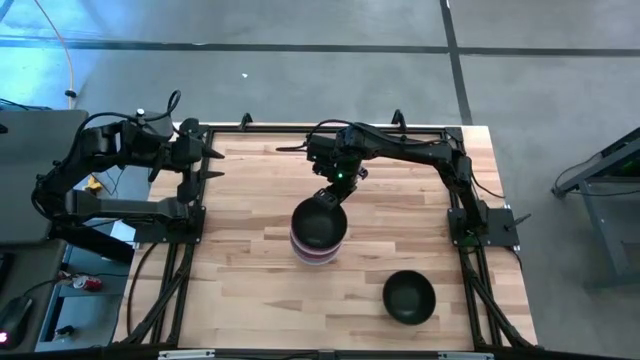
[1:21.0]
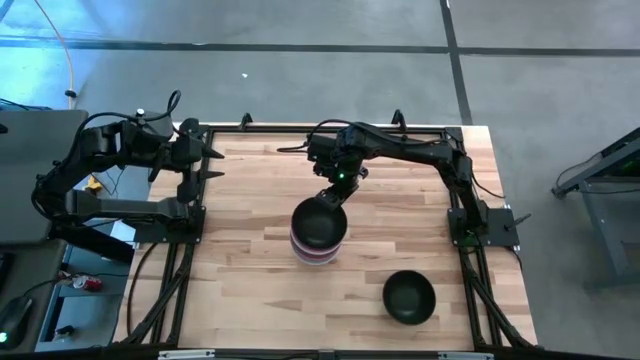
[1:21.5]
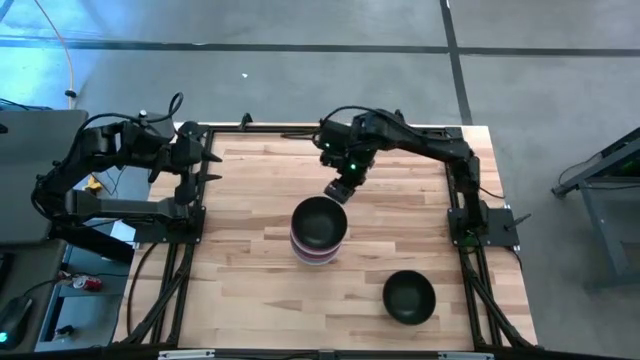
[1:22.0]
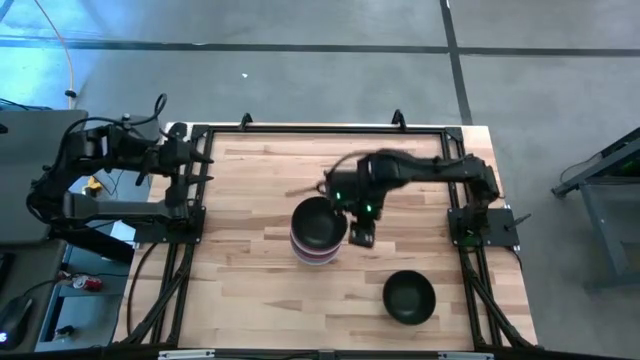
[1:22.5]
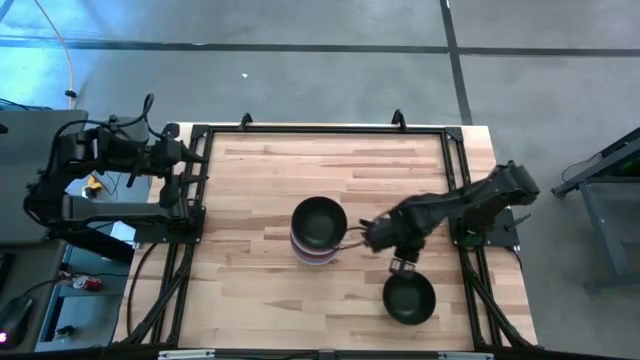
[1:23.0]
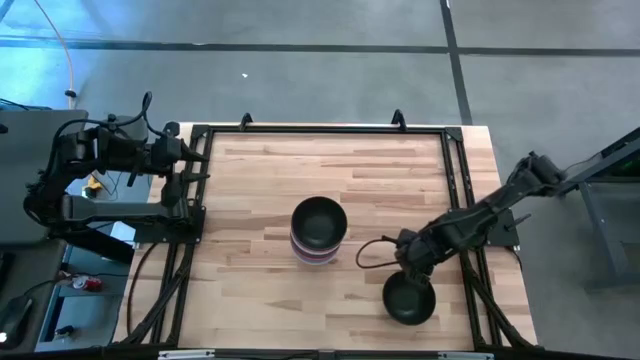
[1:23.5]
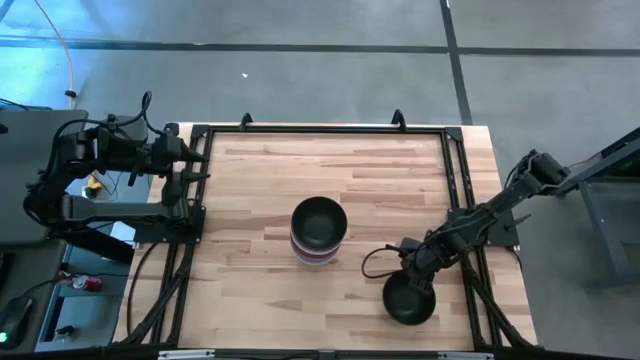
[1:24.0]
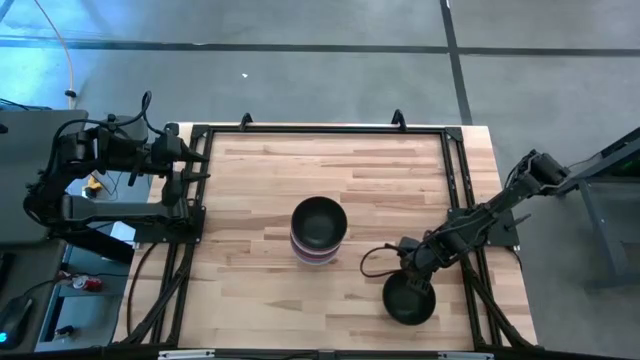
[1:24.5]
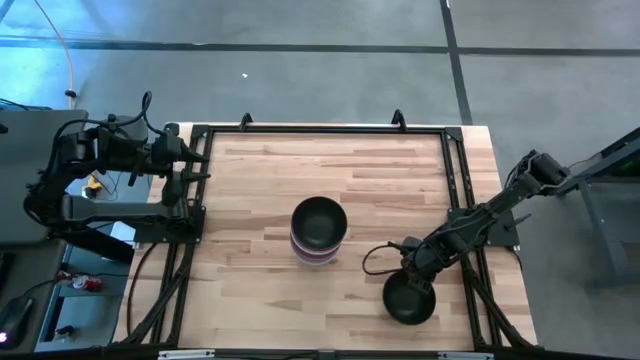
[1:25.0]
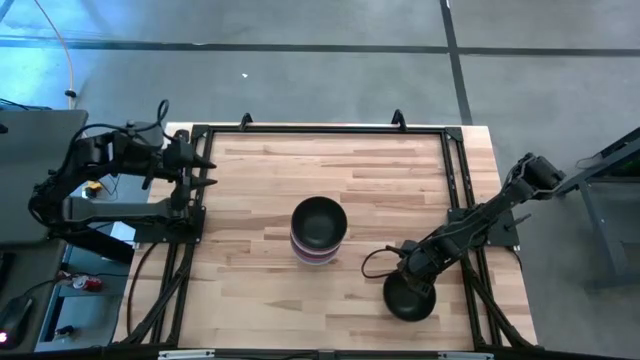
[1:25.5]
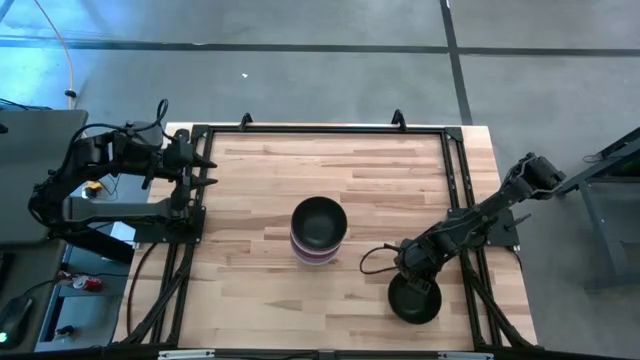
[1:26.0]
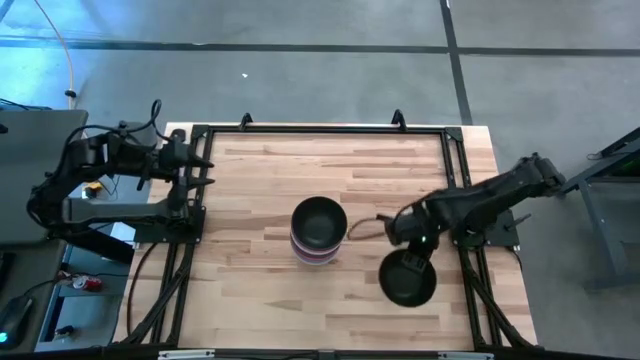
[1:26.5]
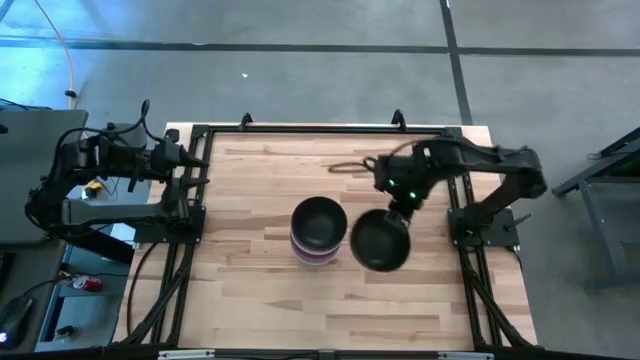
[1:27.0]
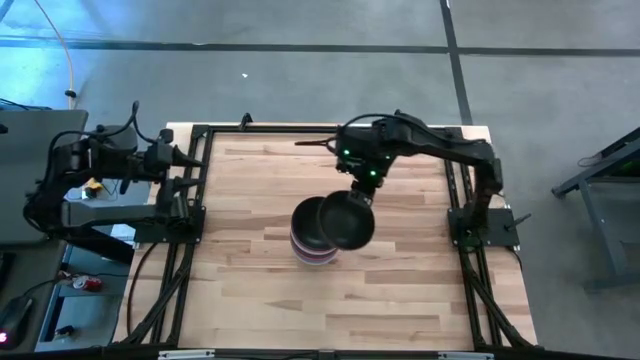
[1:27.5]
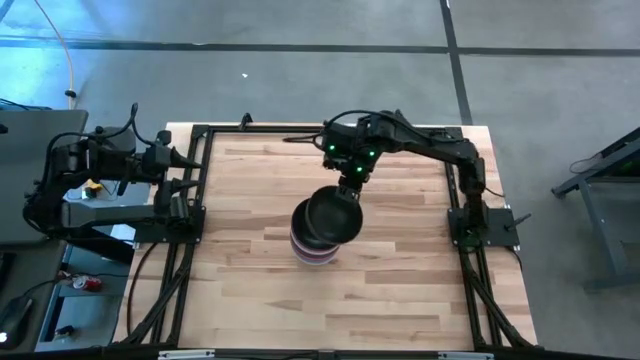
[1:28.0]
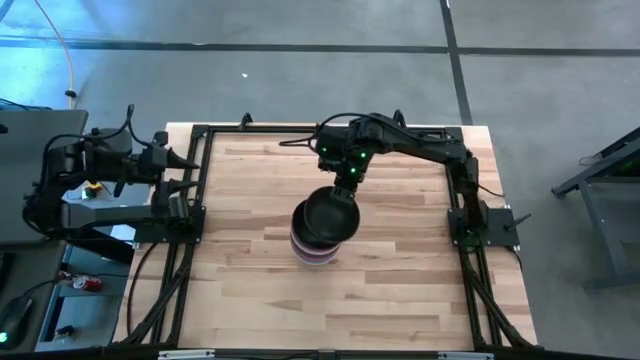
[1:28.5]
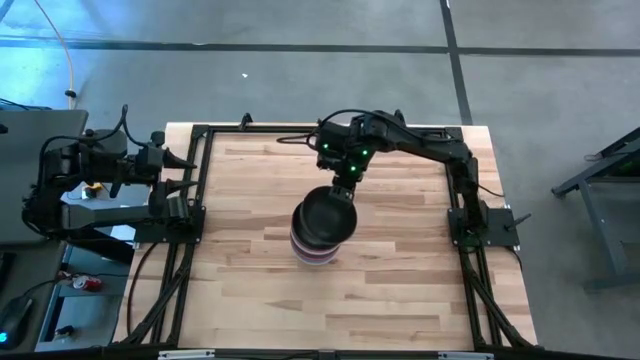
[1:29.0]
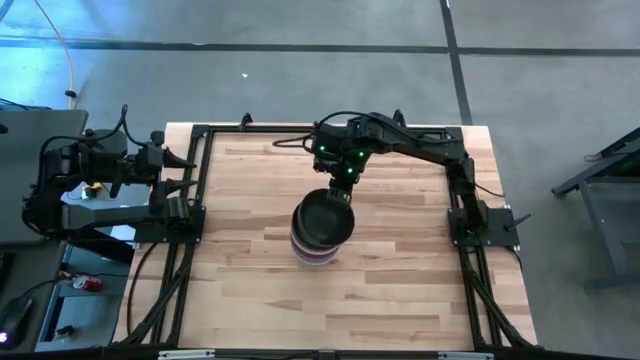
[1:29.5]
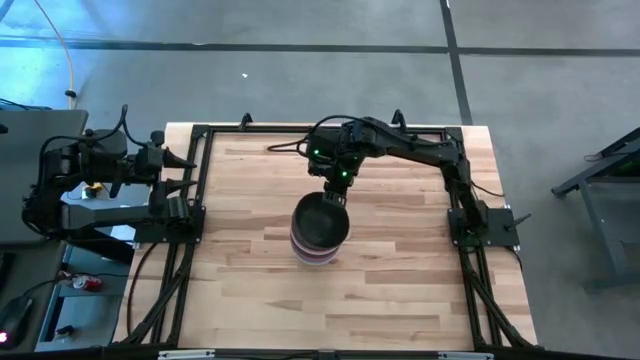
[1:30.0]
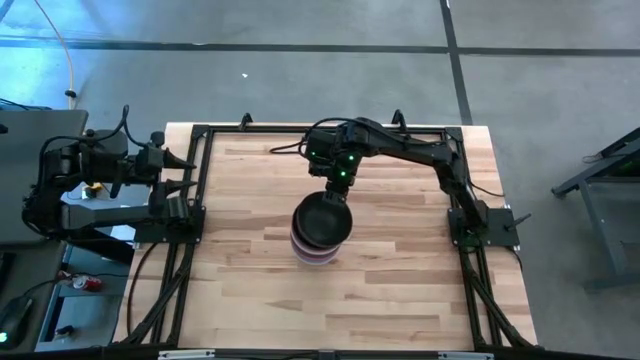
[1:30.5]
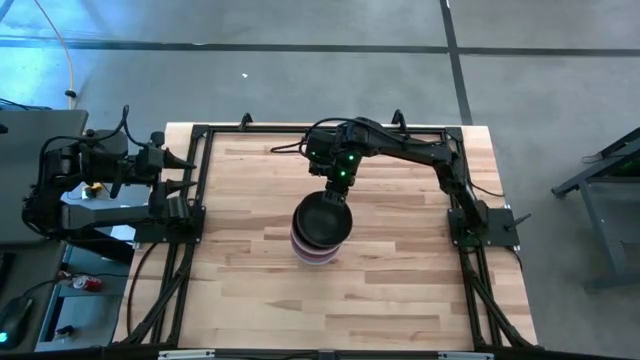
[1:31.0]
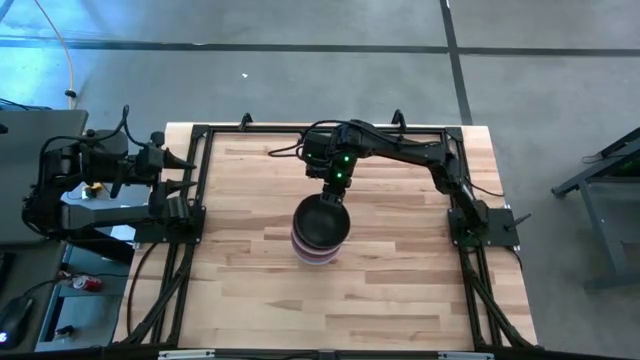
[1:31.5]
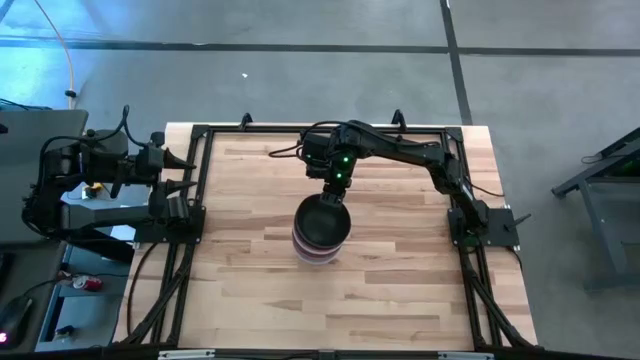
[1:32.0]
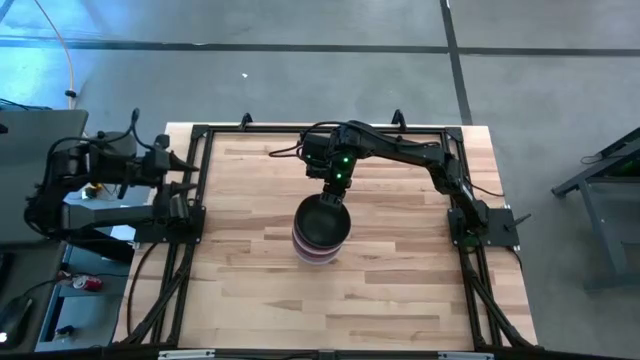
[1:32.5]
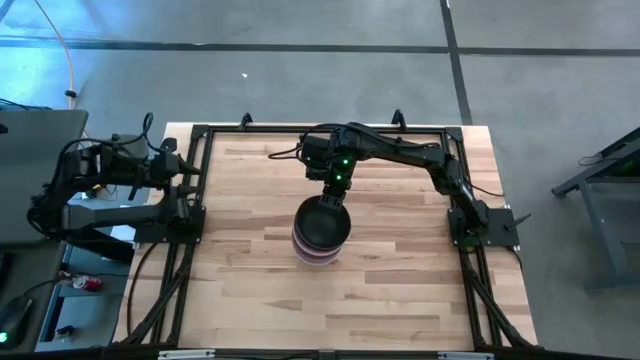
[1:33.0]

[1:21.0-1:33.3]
Task: Nest bowls inside each other
Stack the black bowl on top of the top black bowl

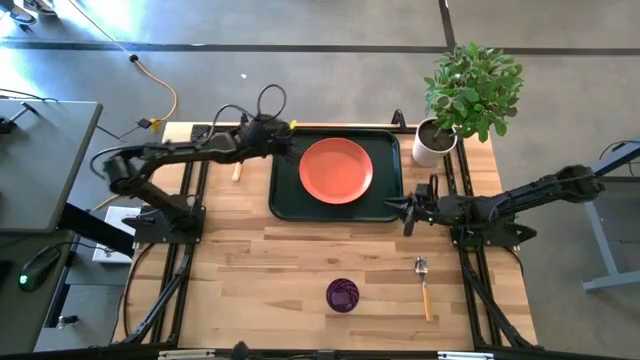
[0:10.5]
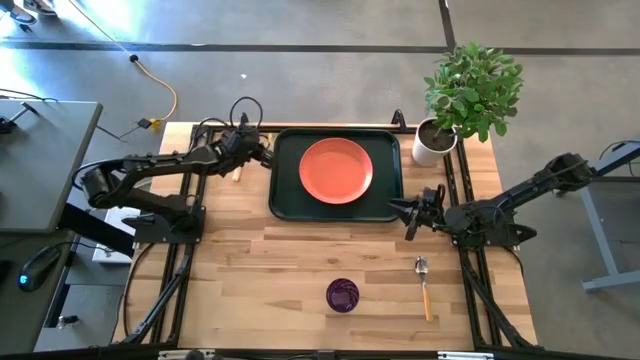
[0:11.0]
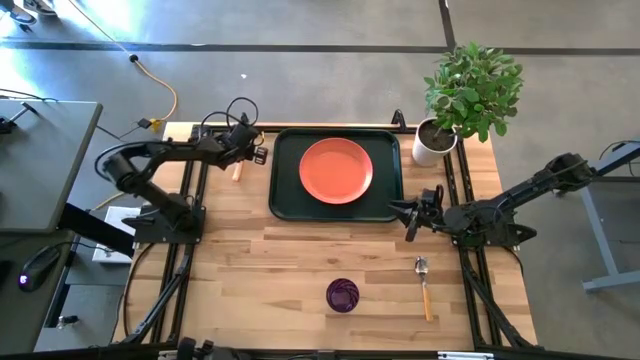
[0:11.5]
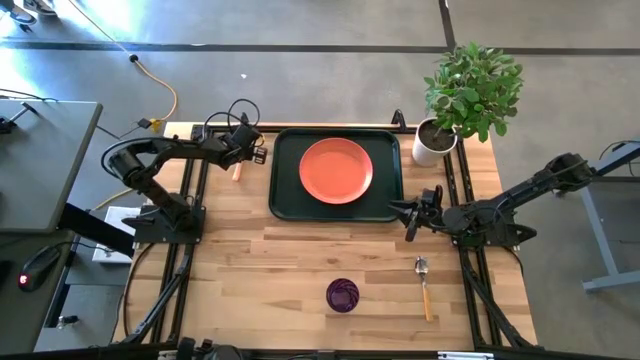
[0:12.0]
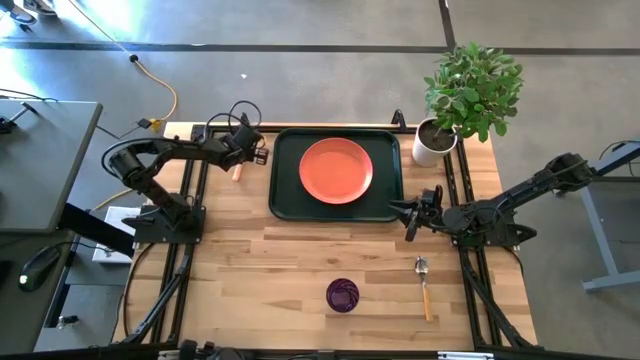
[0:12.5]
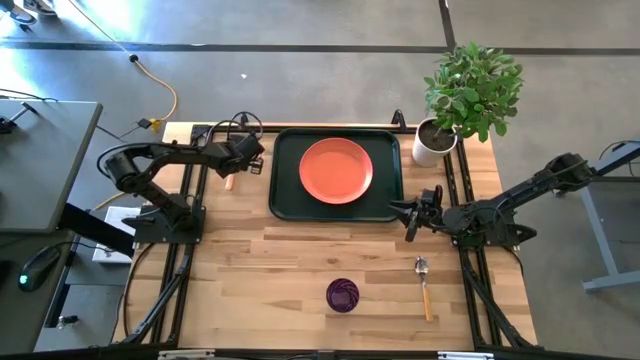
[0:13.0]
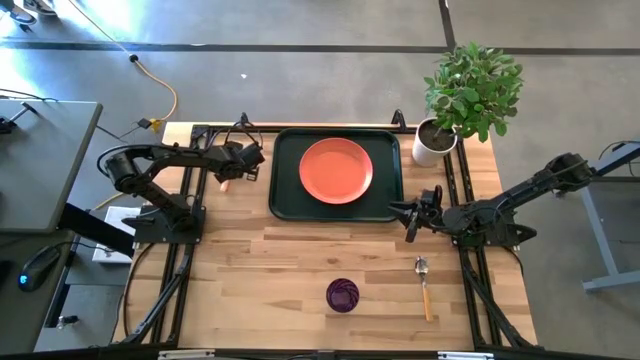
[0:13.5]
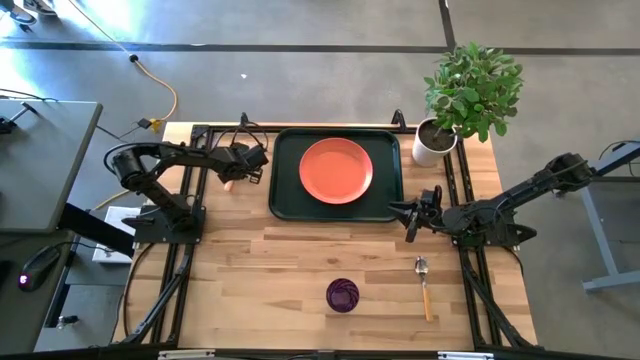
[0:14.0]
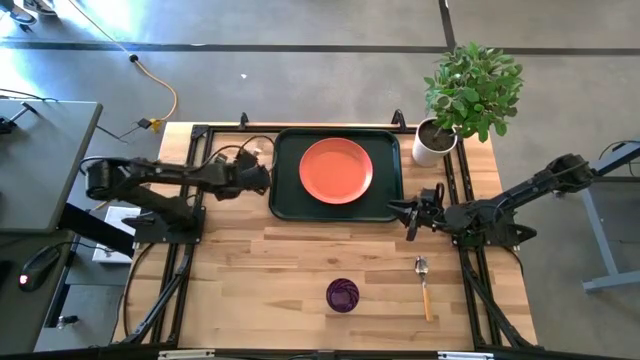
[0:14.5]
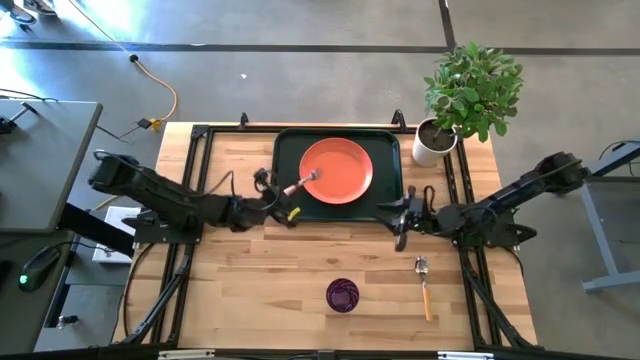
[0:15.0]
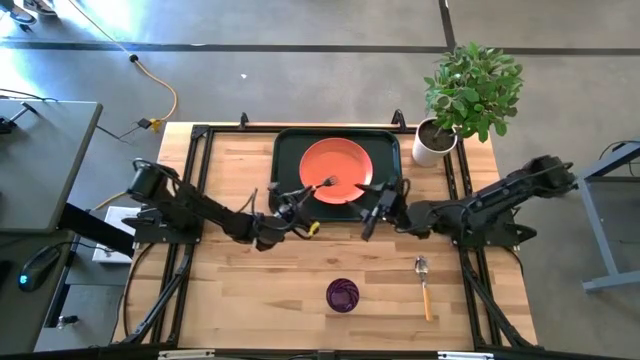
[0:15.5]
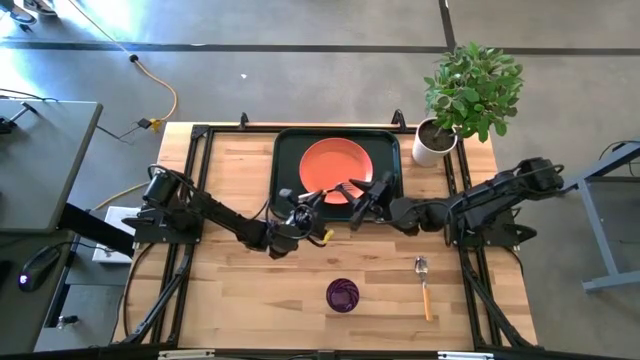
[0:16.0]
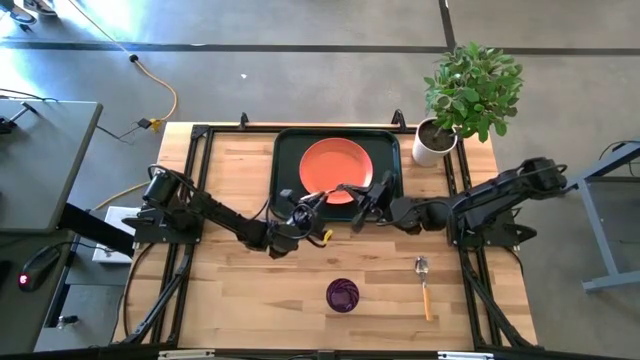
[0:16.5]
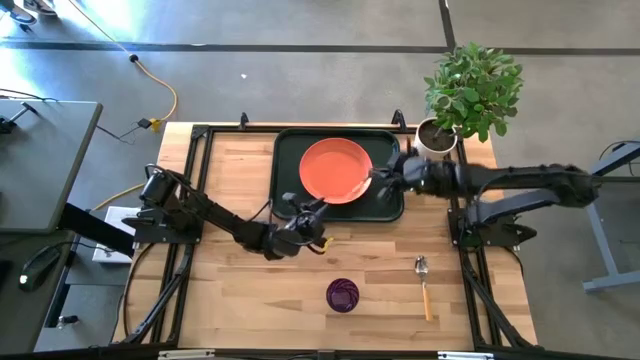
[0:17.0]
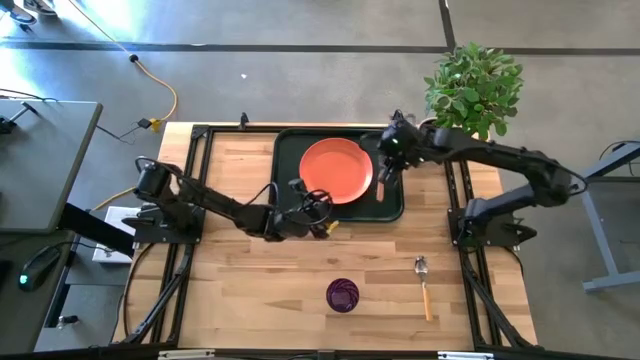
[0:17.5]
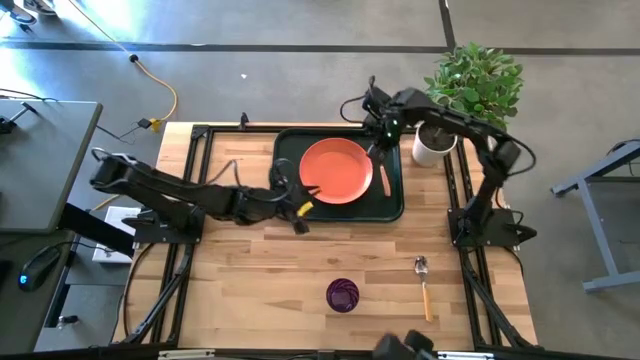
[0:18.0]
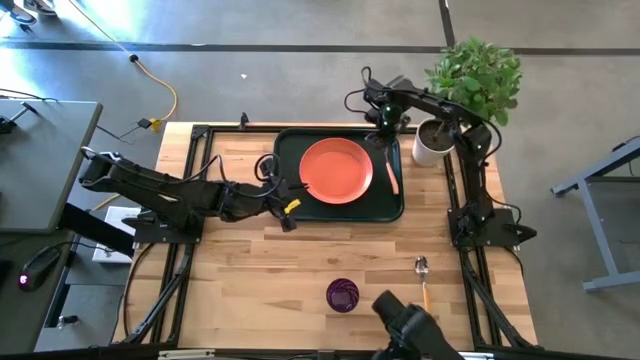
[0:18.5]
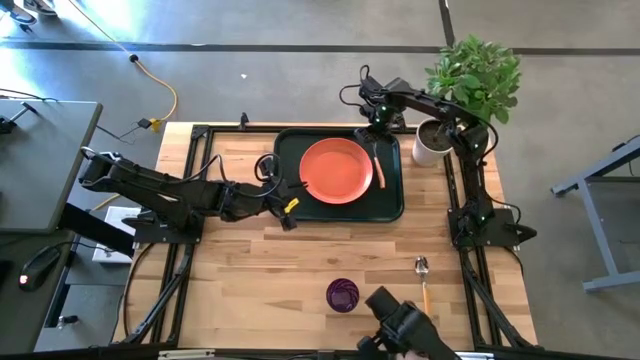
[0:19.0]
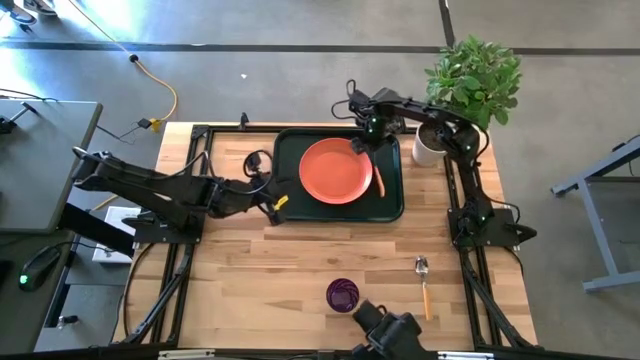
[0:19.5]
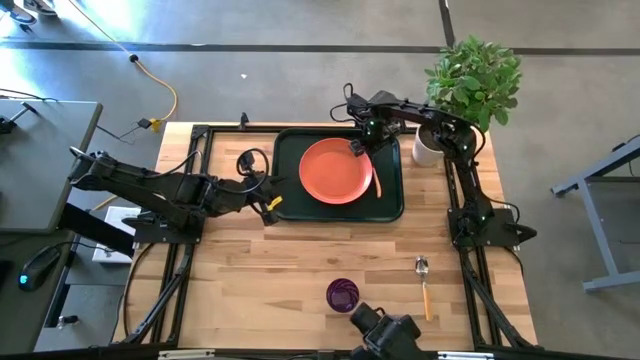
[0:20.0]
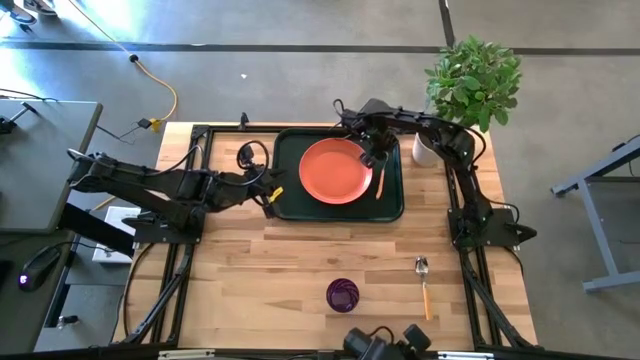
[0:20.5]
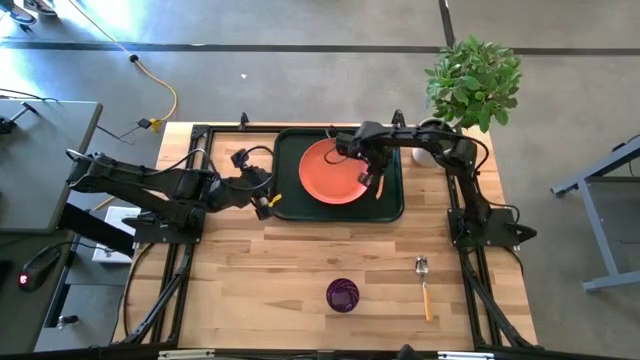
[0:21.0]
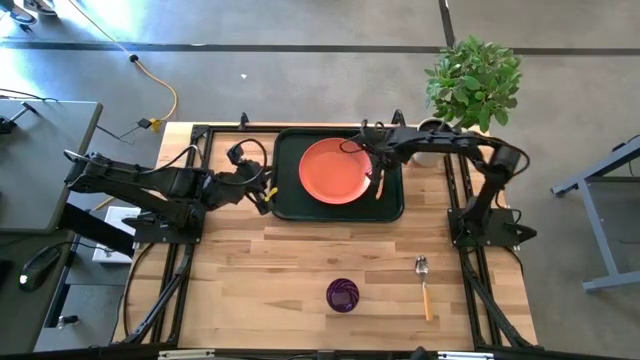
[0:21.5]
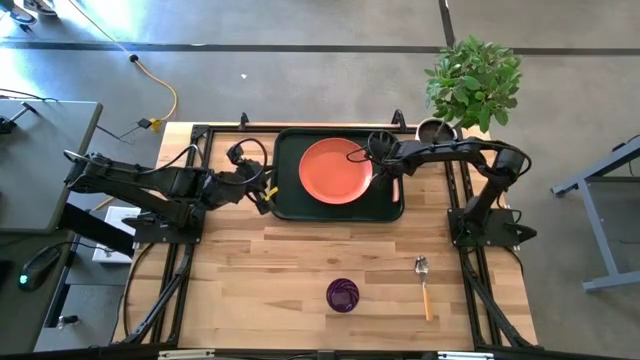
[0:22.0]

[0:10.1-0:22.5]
Task: Pick and place plate/cup/fork/spoon on tray
Put the yellow fork on the dark green tray to the right of the orange plate
